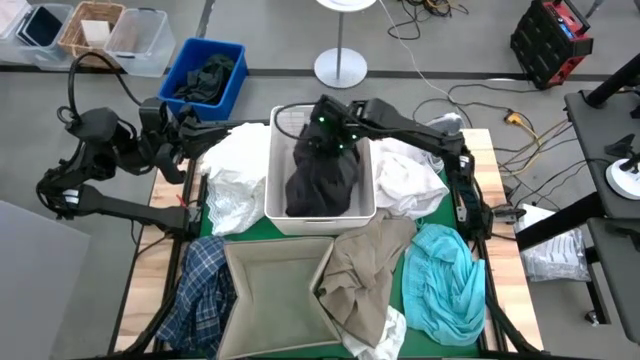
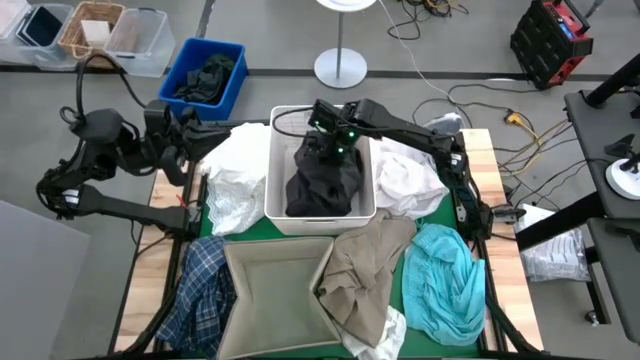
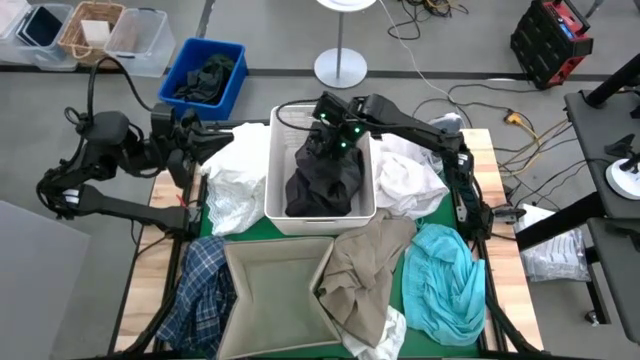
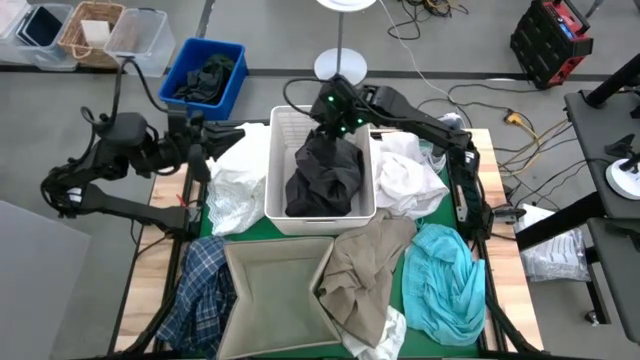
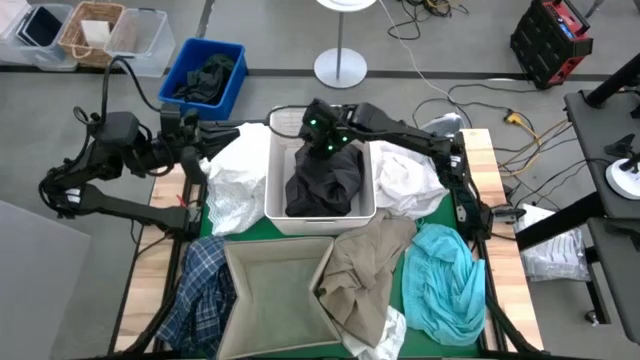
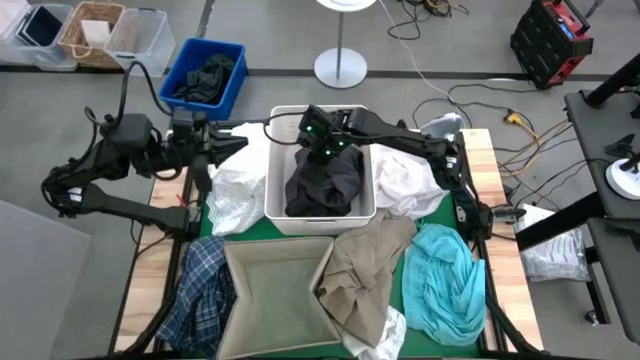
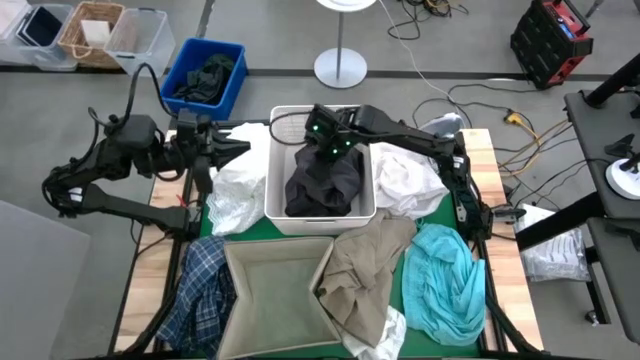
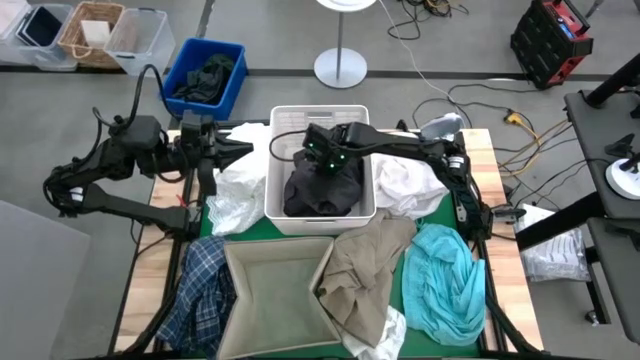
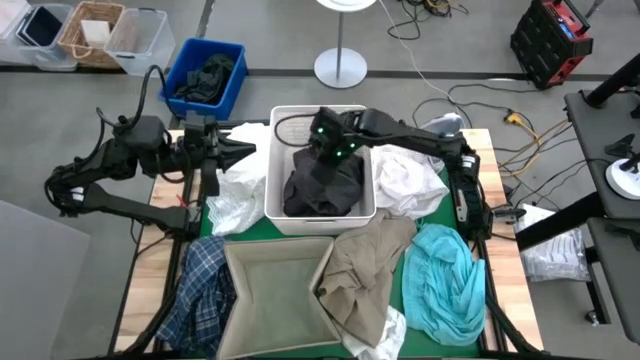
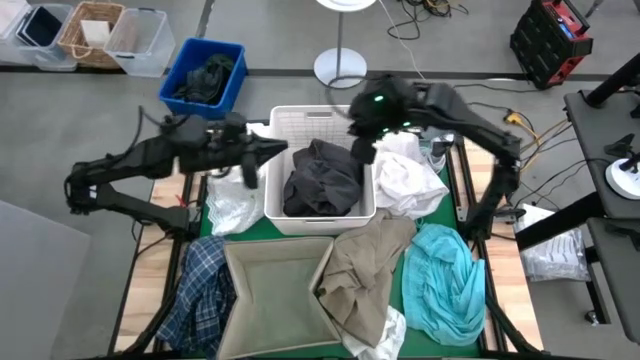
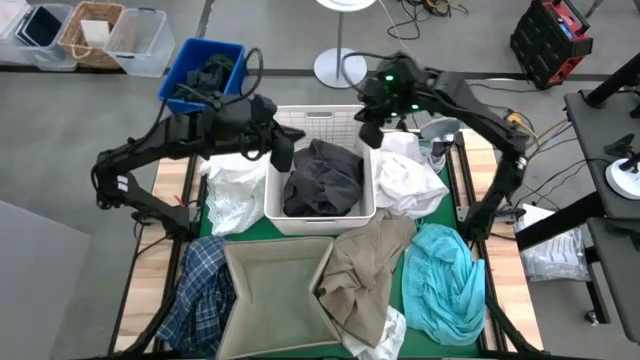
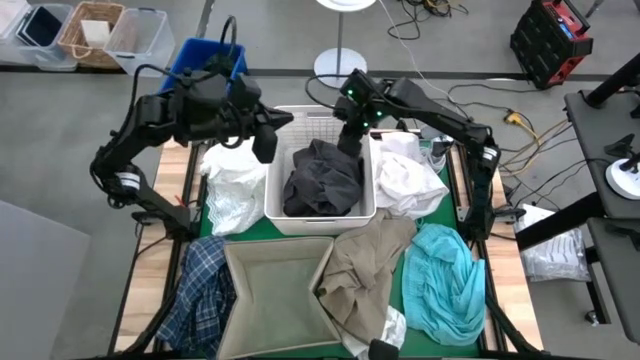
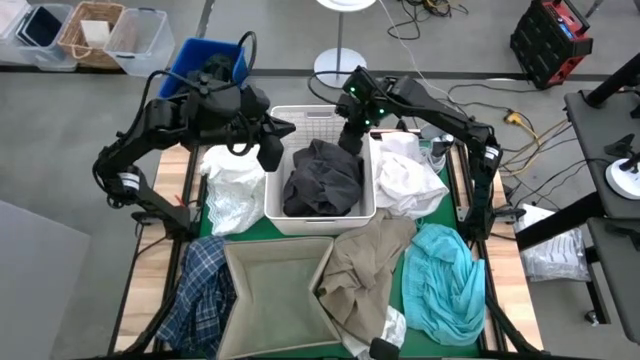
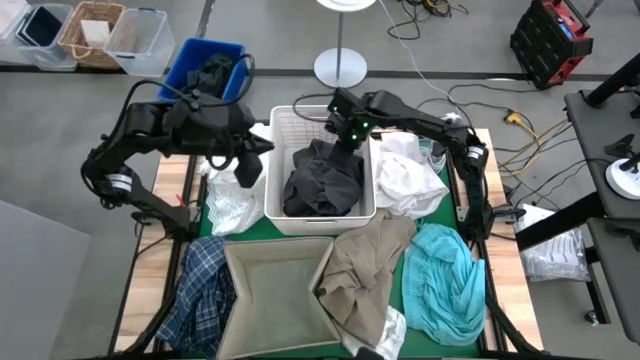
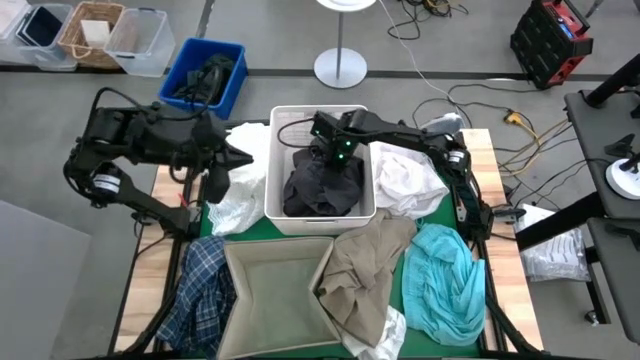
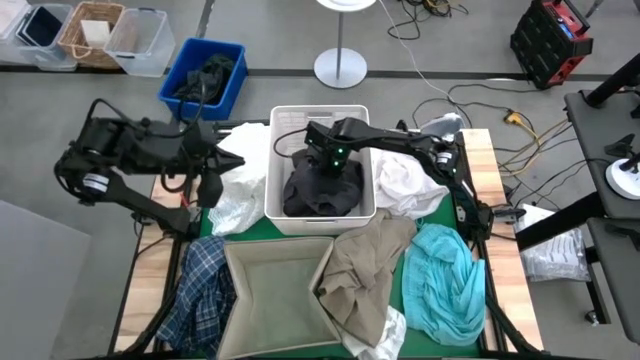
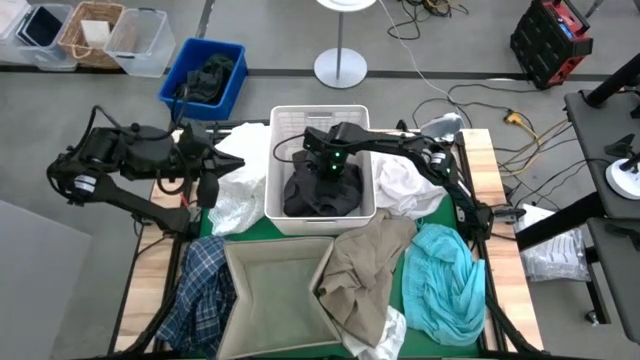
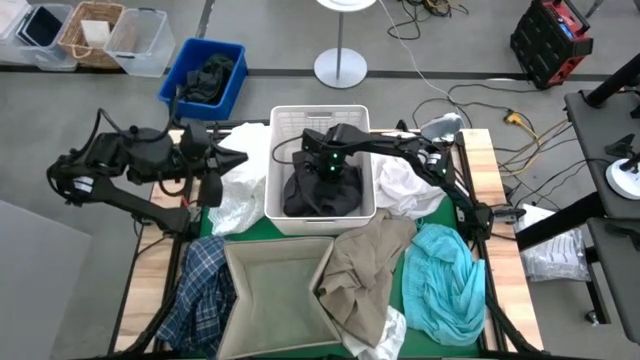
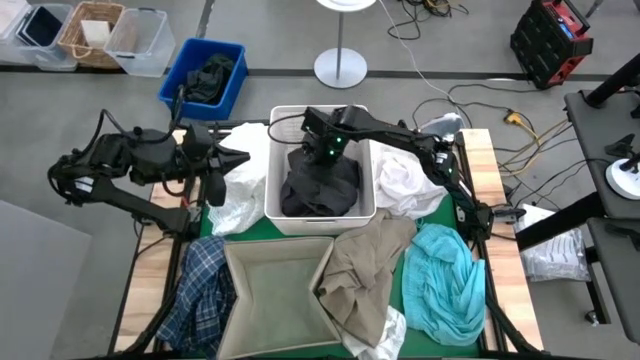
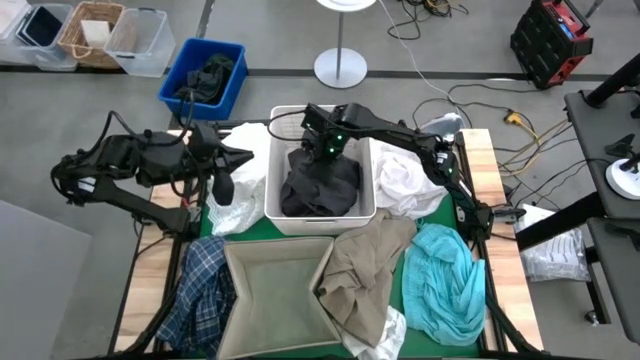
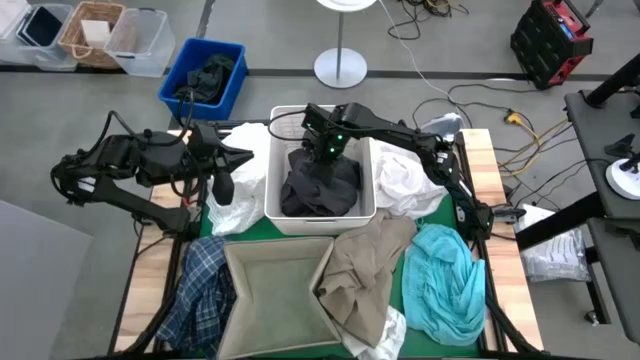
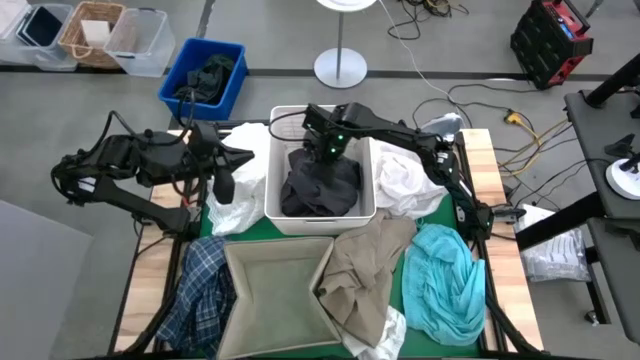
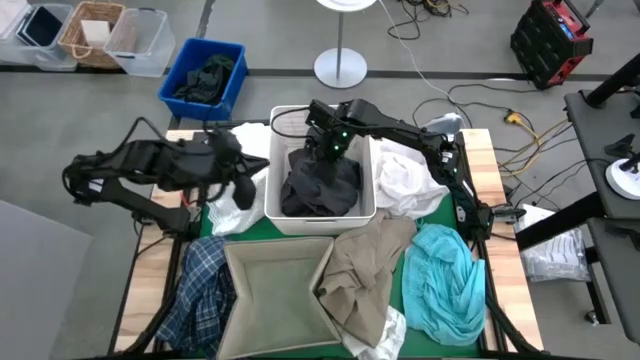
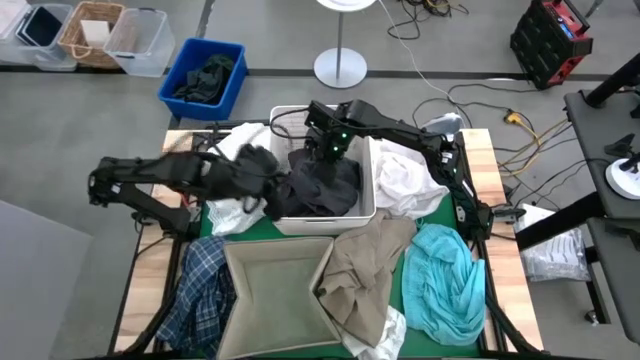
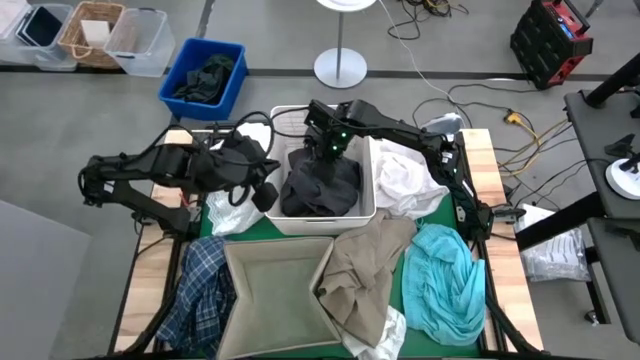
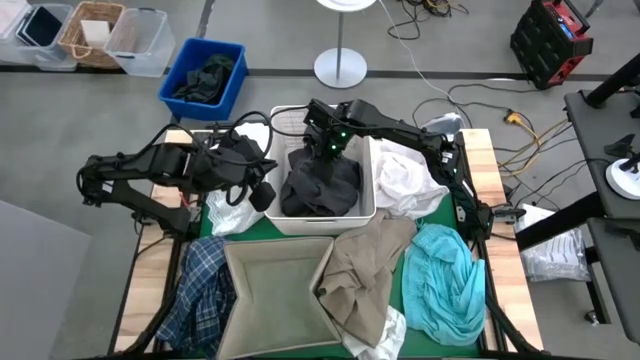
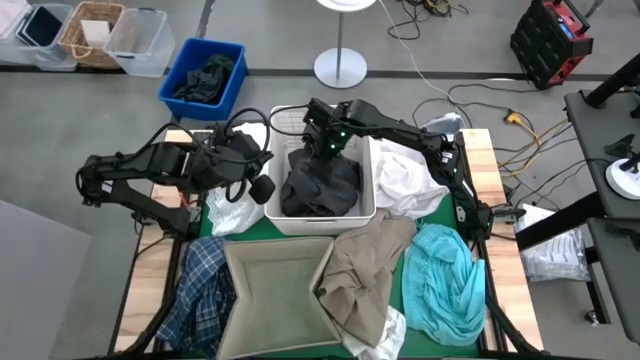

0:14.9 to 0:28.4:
Task: Sort clothes
Put the black short pants into the white bin

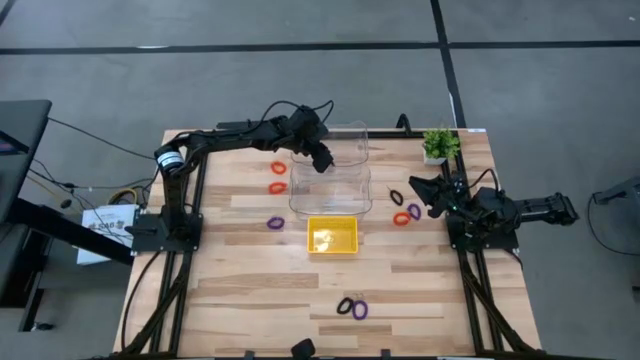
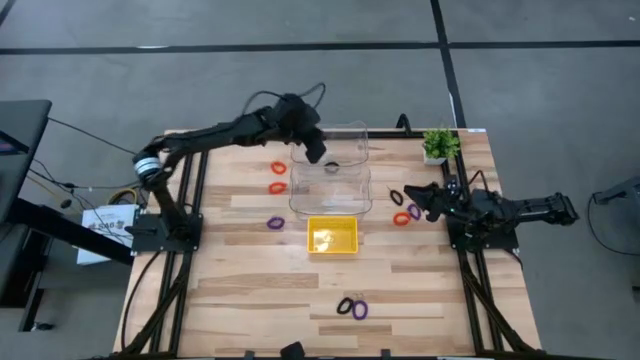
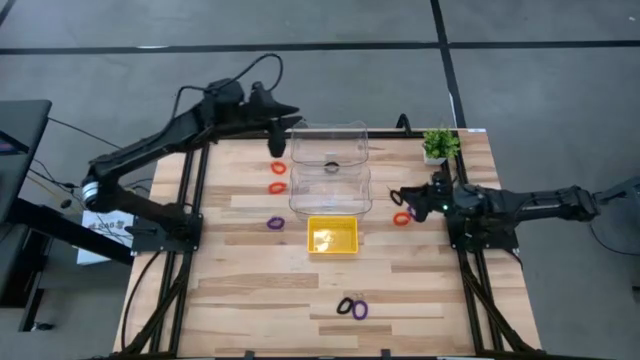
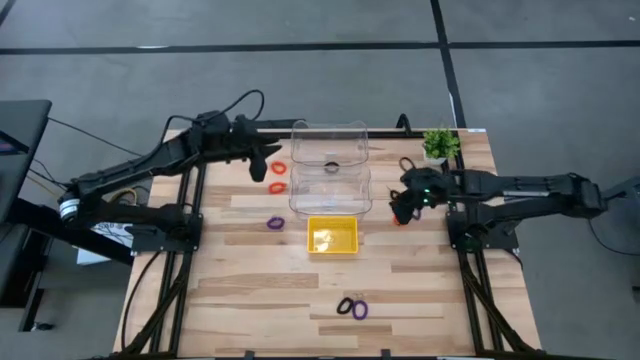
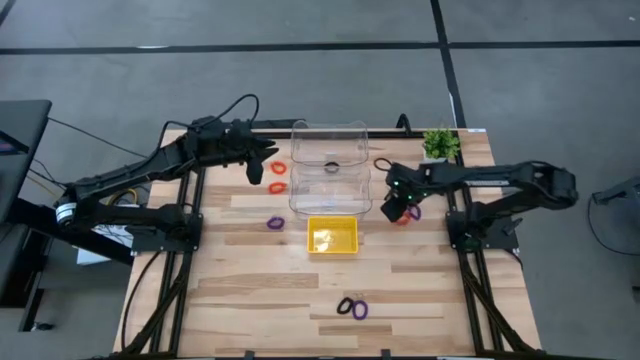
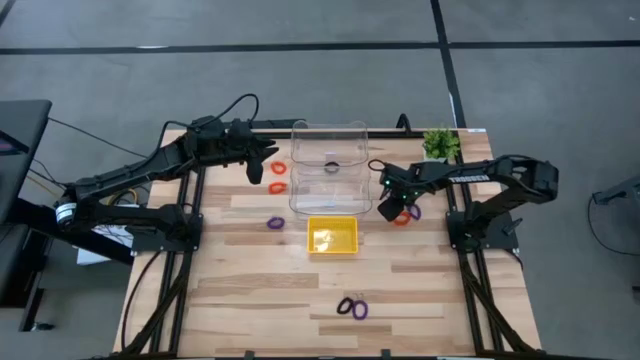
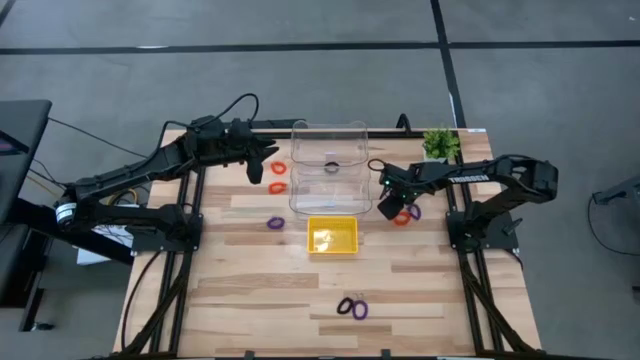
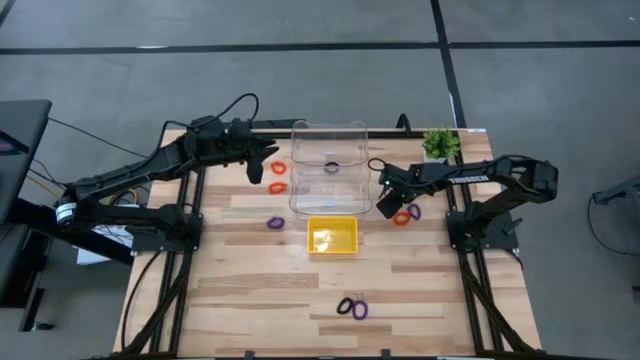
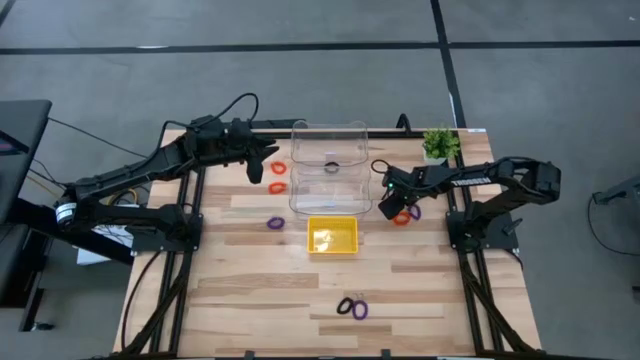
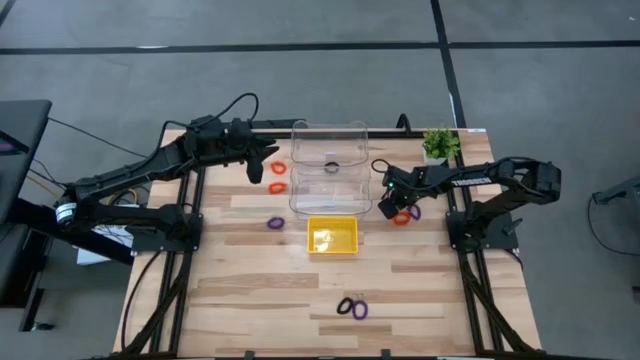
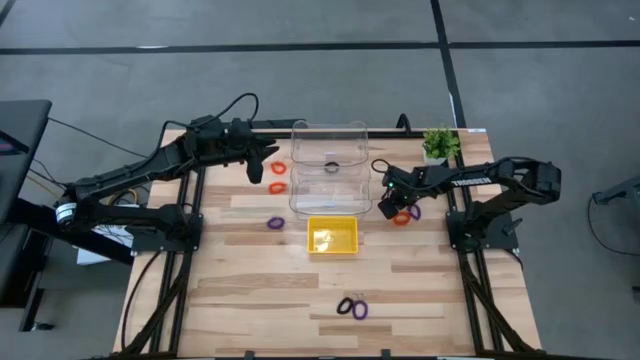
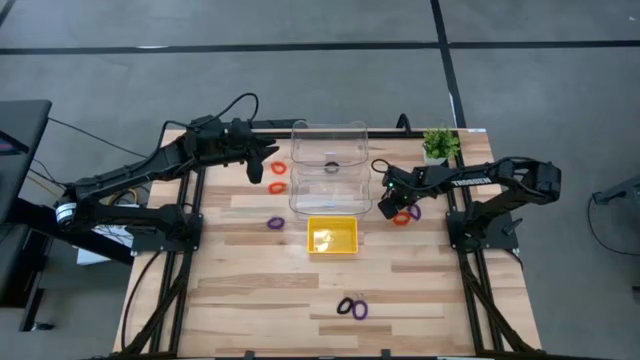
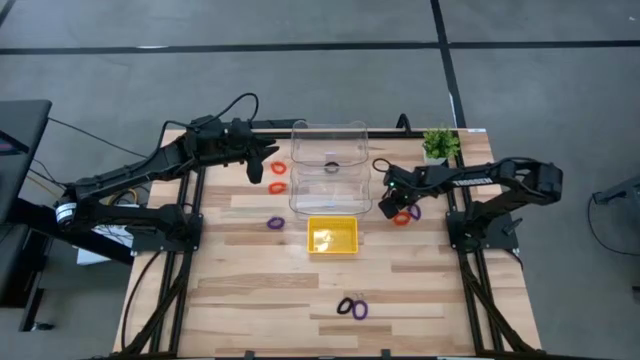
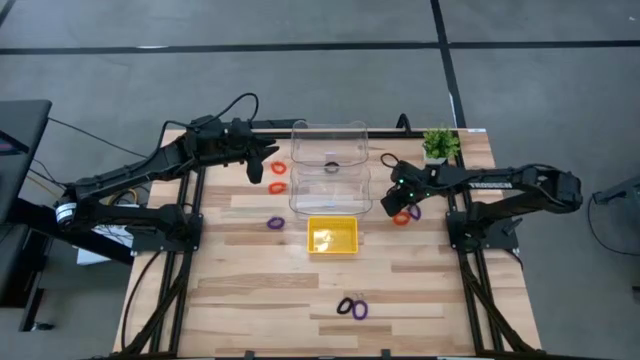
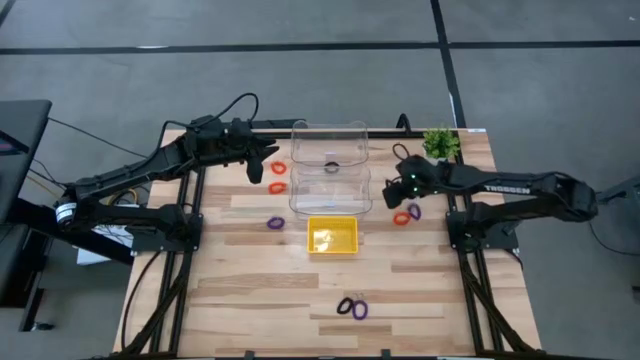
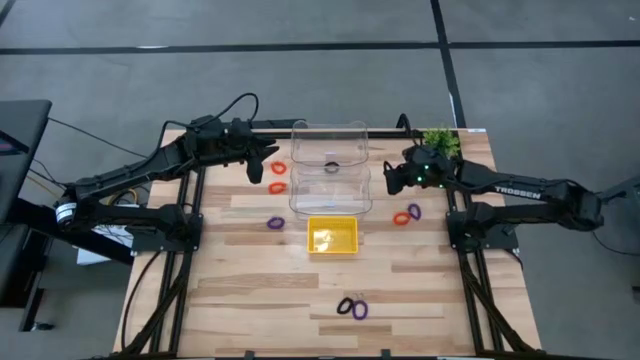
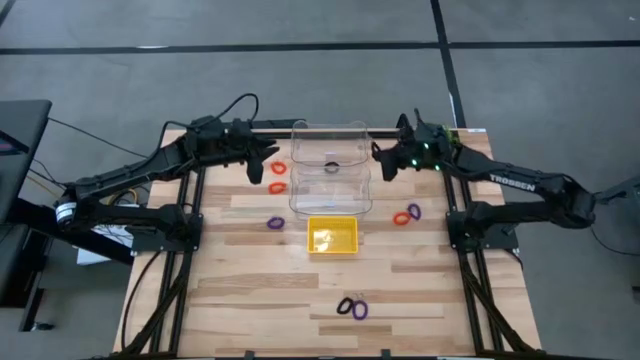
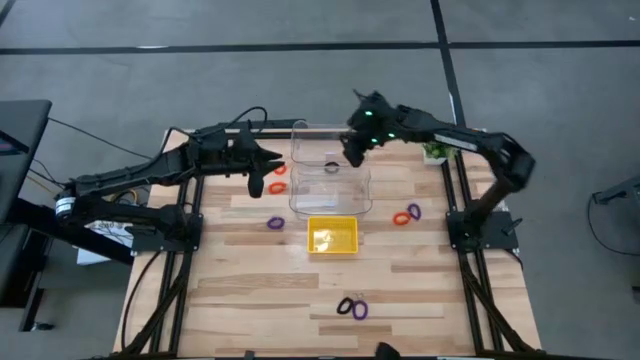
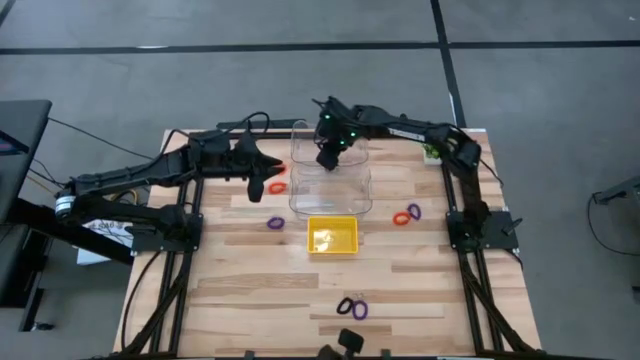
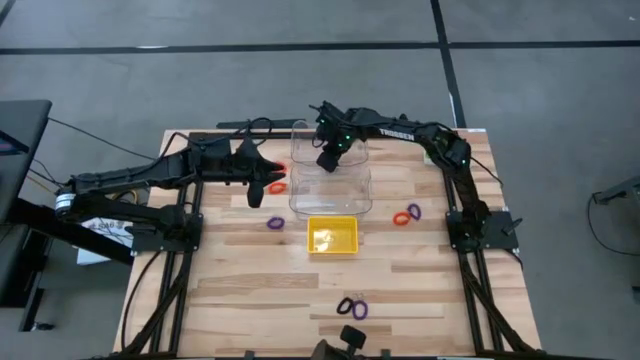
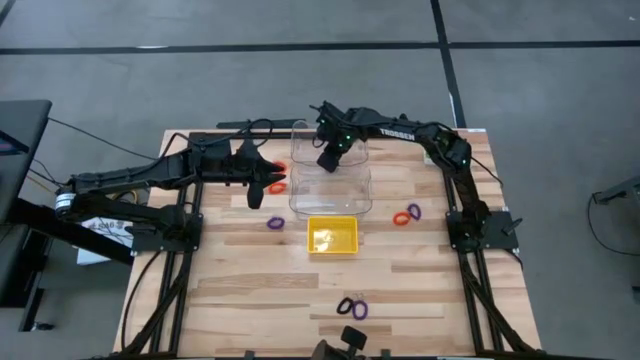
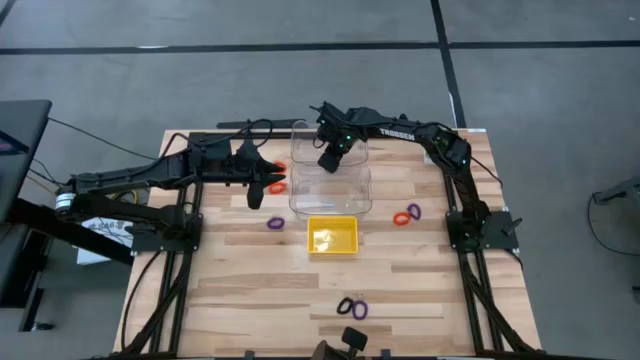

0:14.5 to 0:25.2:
Task: Sort spring keychains
Put the top right black spring keychain into the top transparent bin
